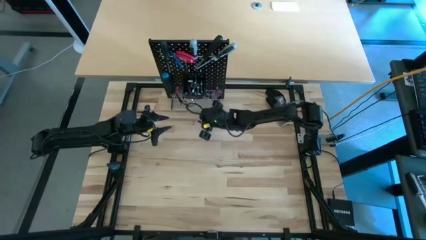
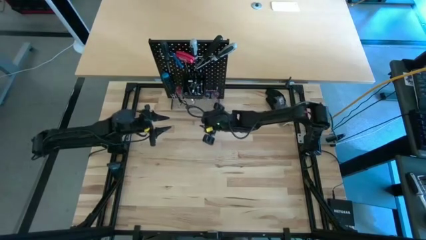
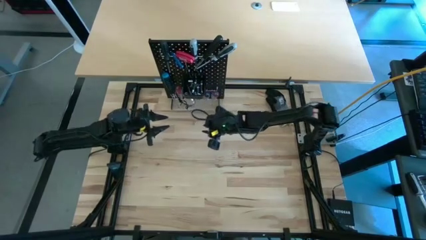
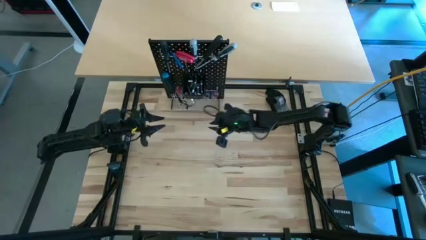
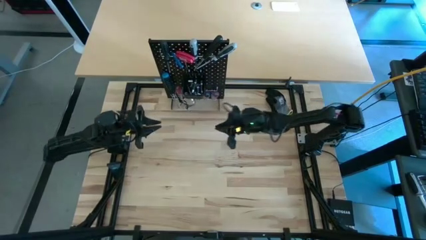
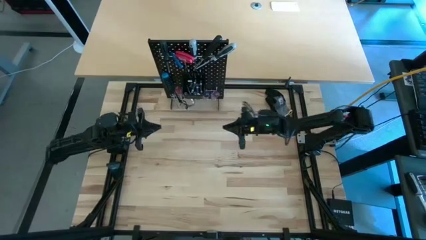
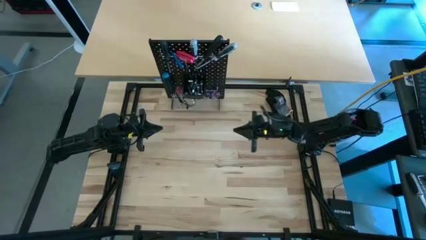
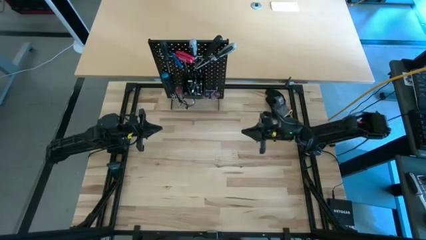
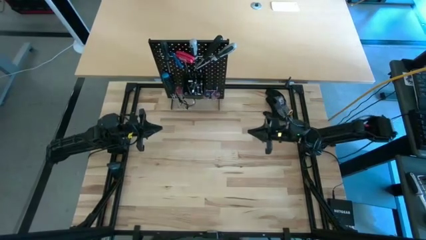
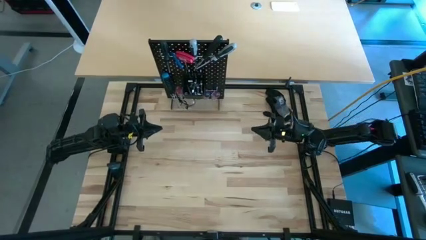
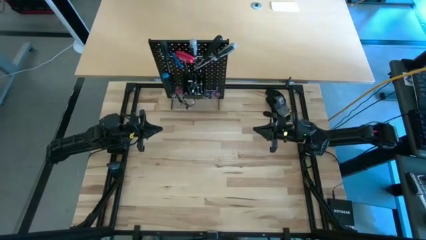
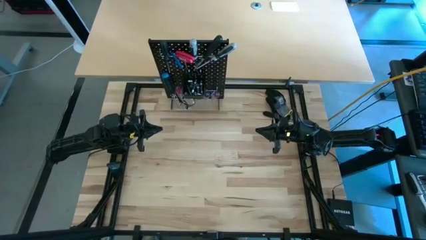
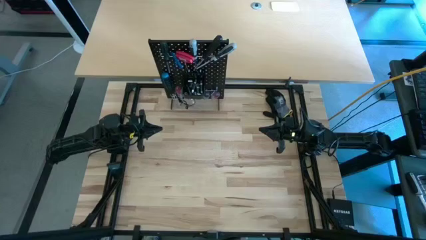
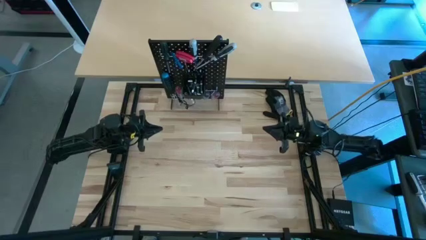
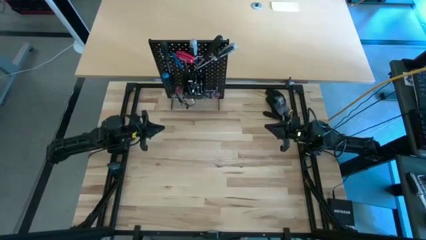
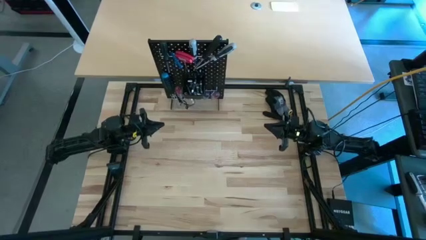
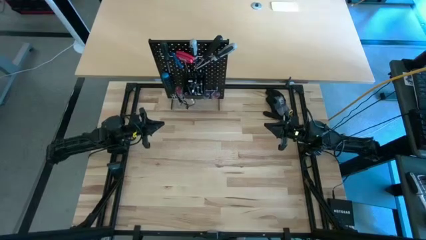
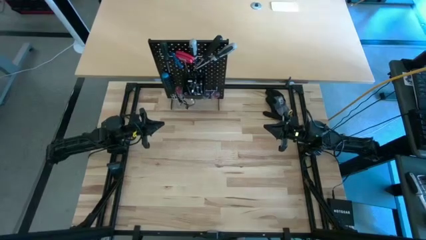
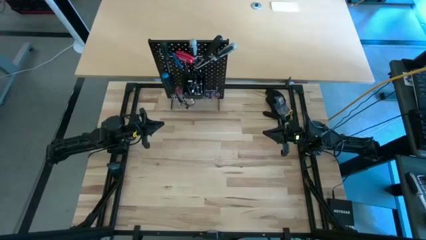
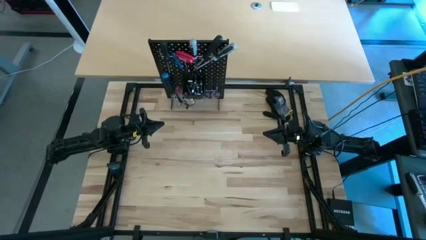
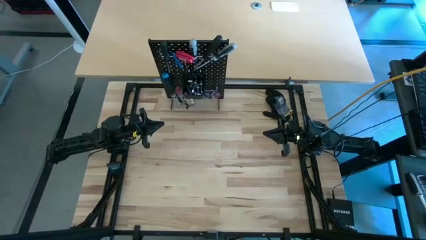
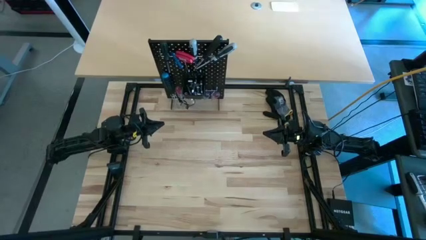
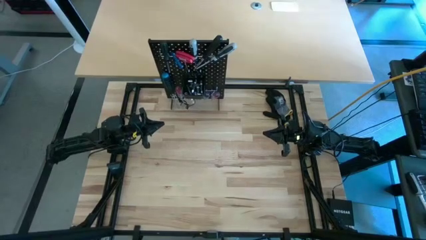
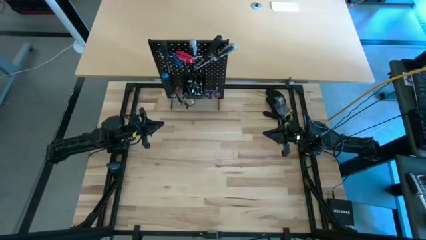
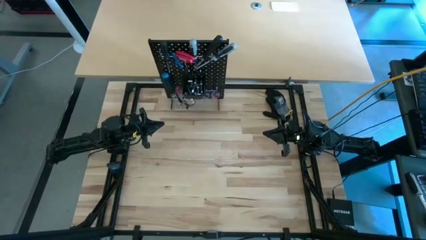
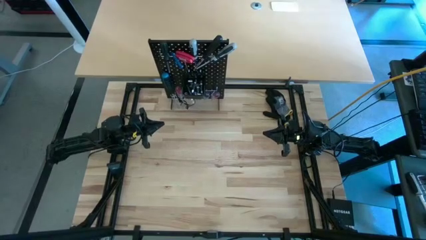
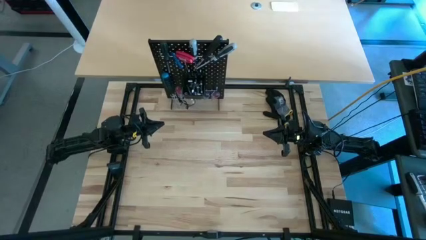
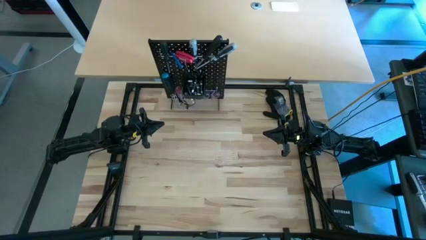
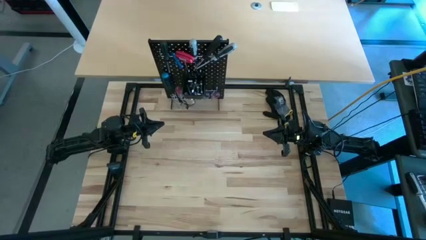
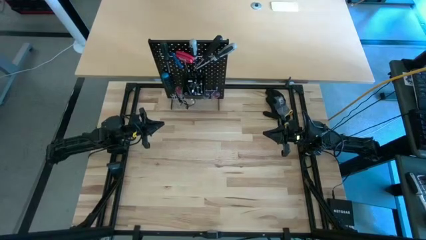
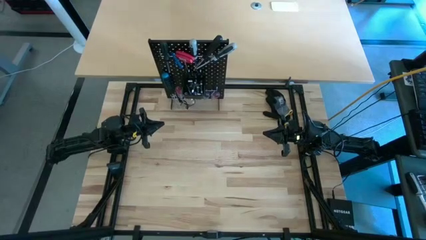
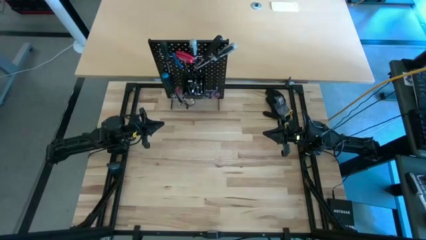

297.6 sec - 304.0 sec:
Task: Hang tools onto peg board
Return to Home Position

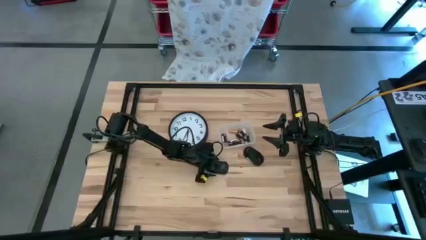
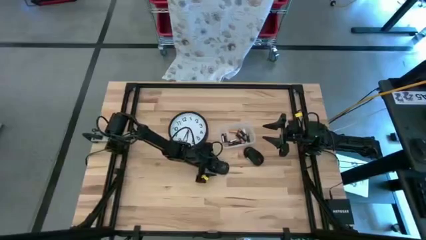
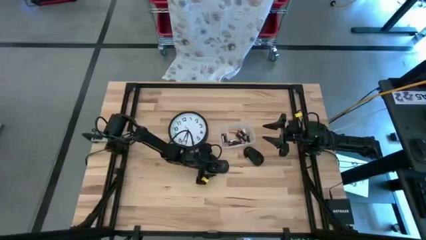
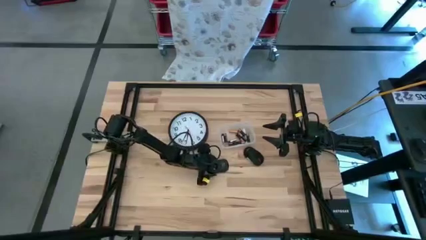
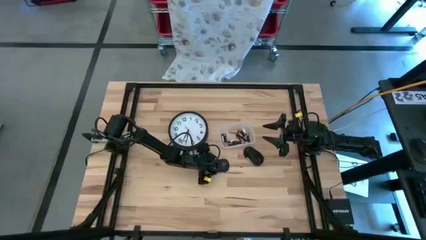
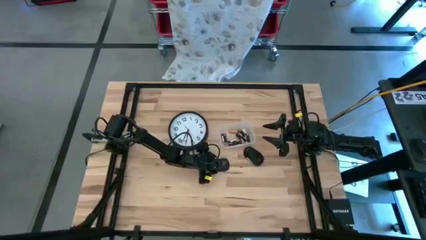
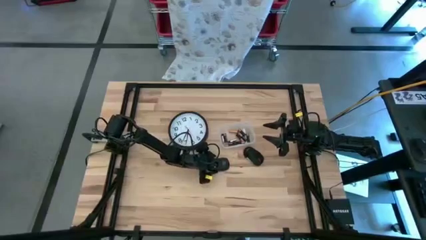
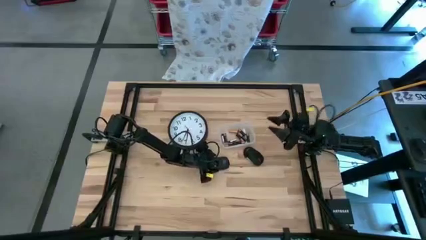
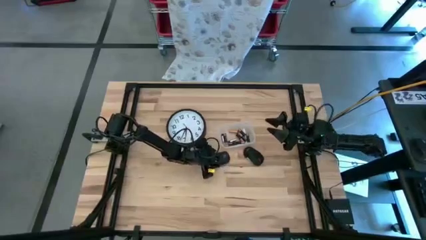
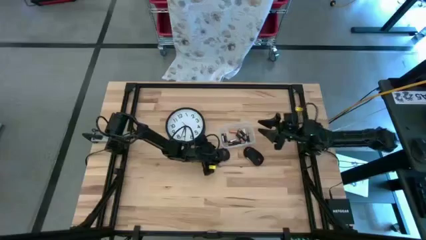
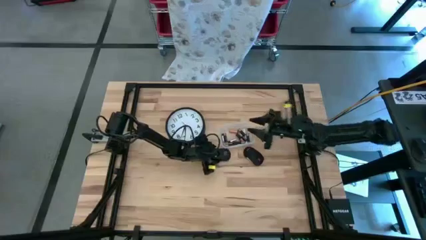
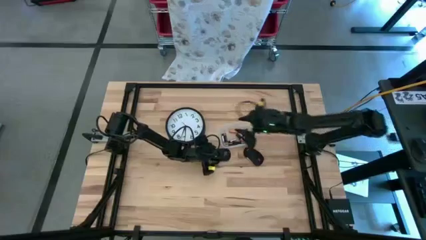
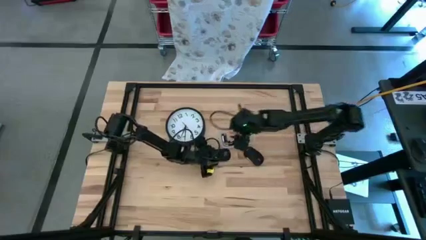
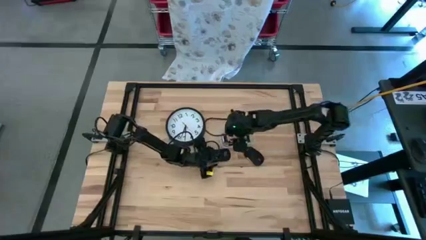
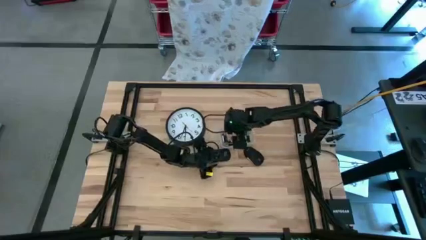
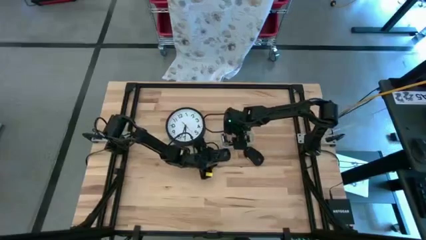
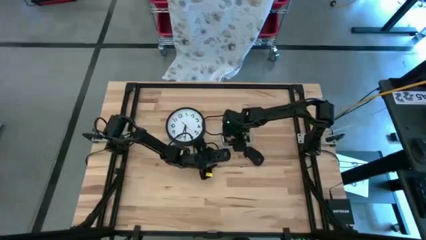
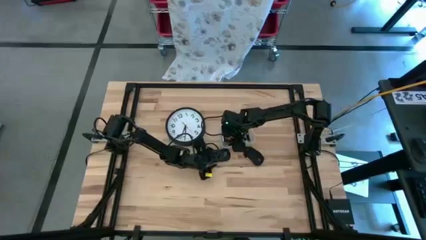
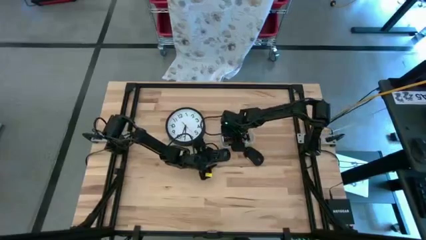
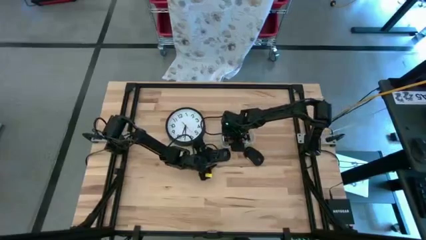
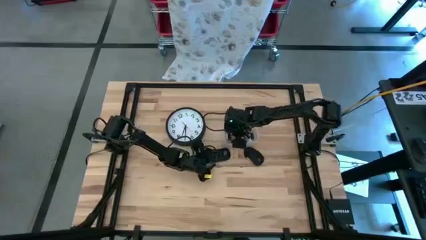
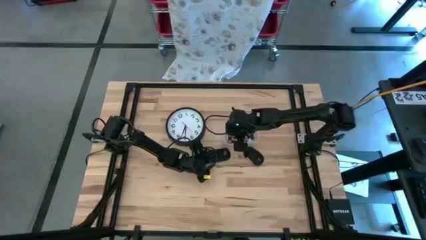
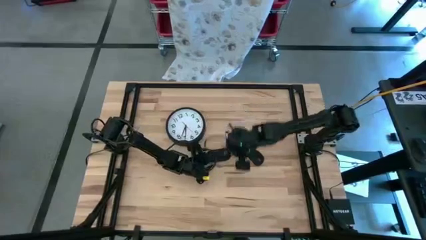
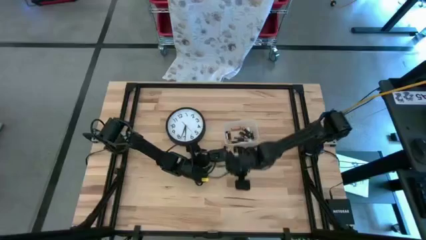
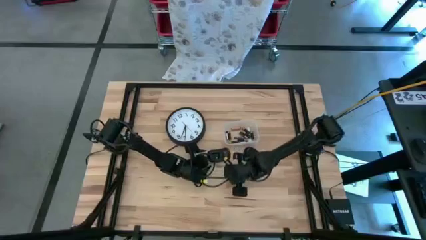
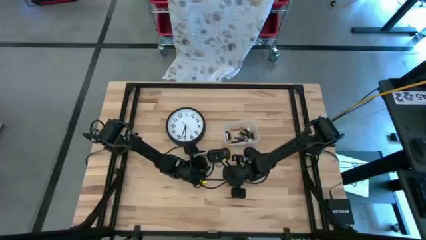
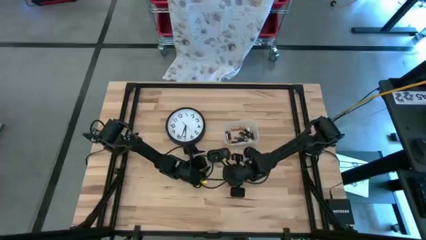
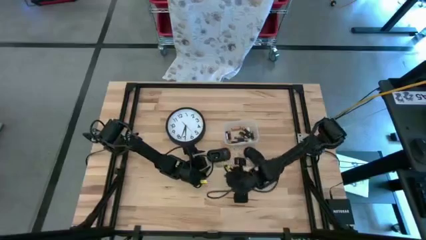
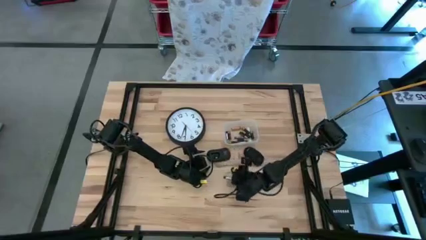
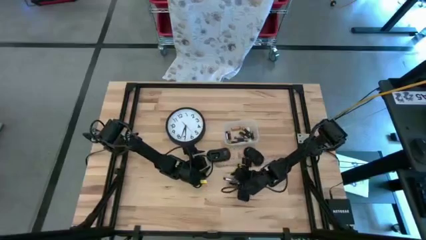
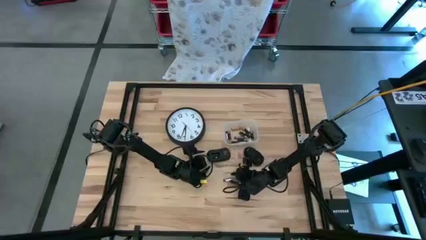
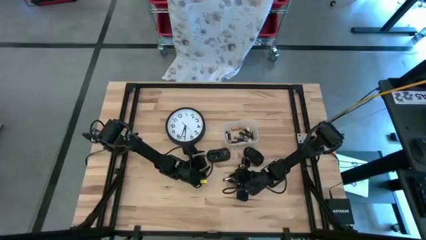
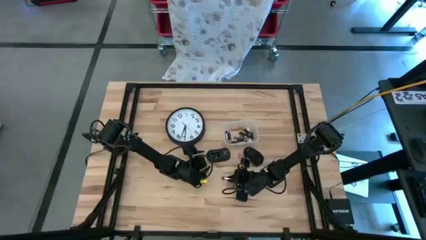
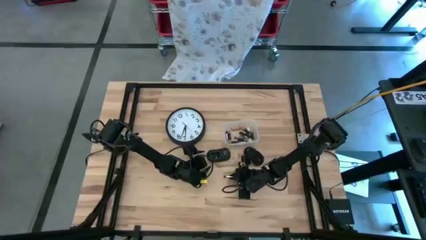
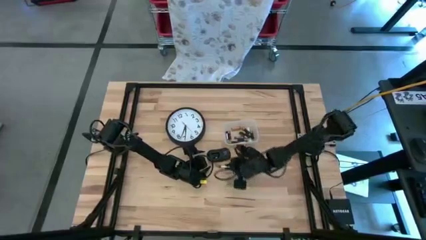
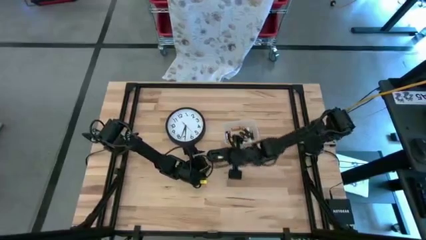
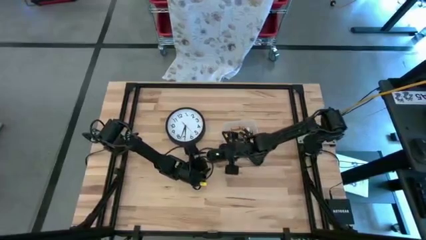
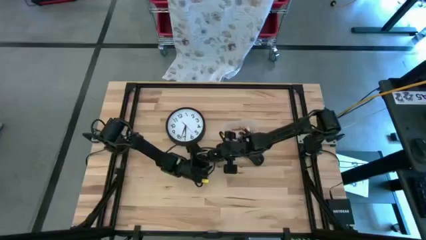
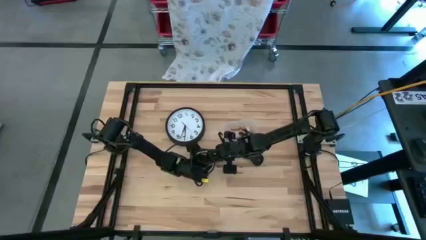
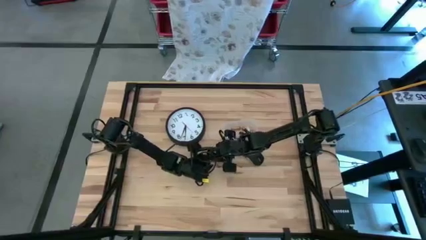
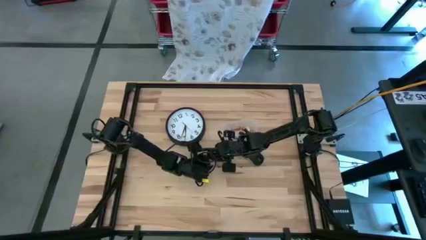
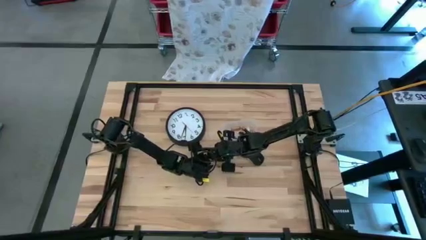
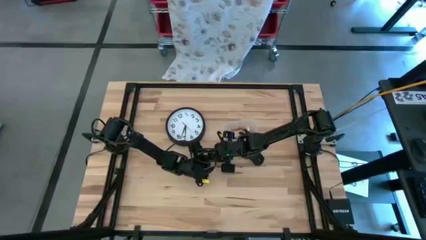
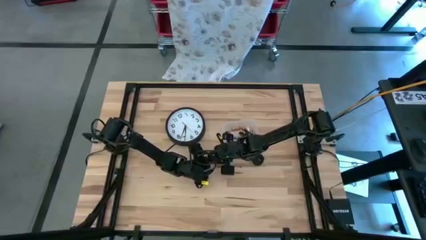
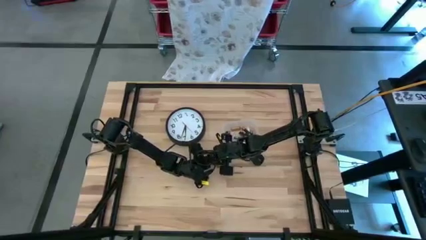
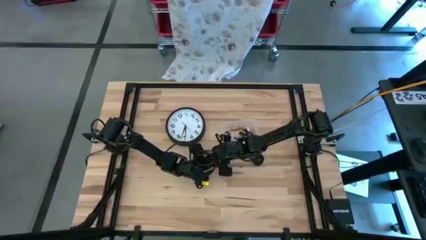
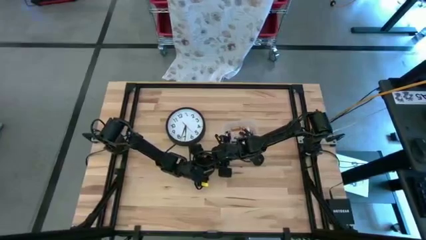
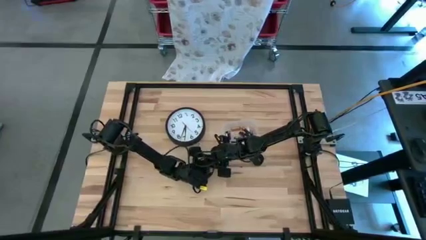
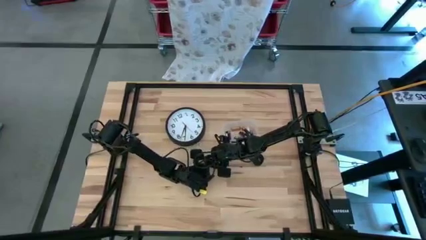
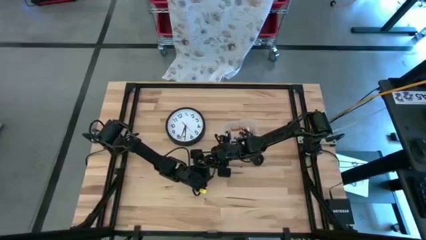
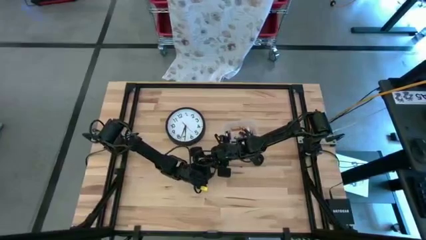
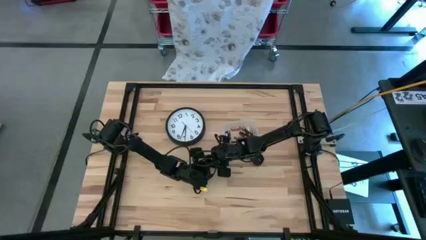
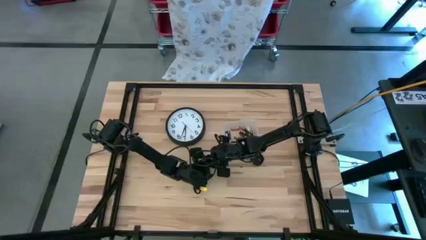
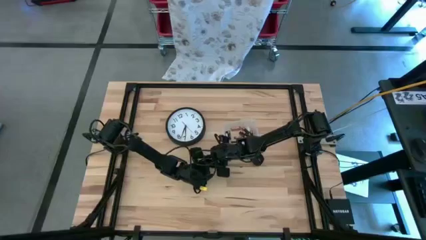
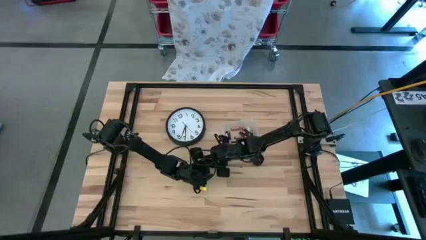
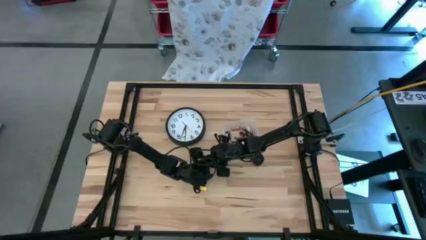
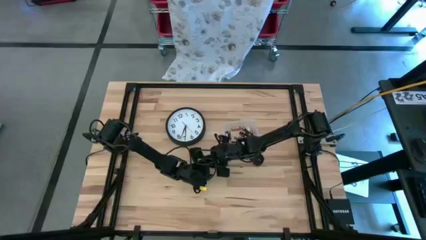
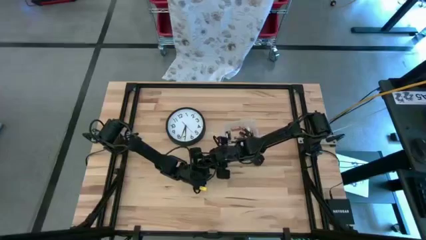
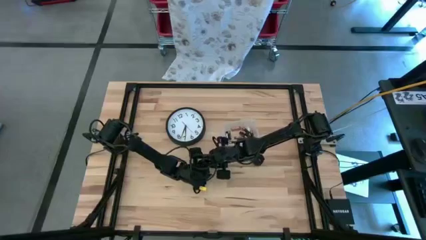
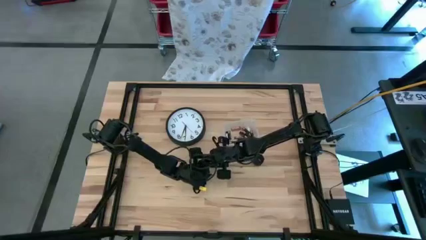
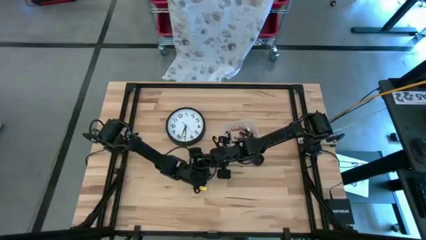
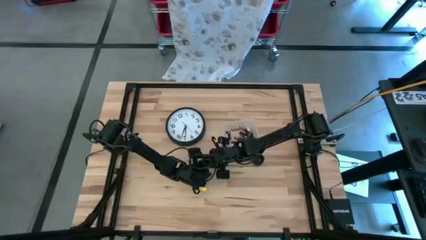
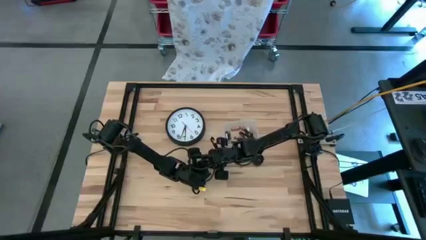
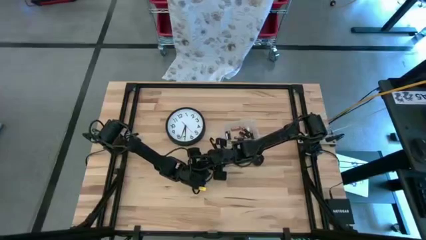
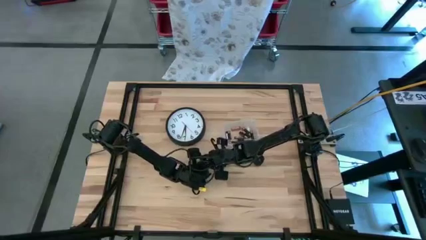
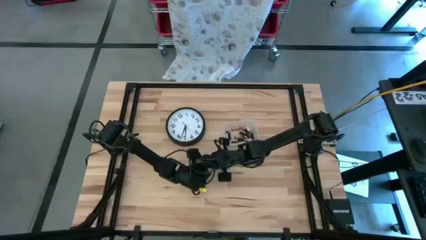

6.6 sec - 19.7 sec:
Task: Insert battery
Insert the silver battery into the left computer mouse
